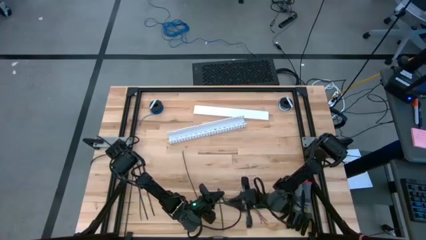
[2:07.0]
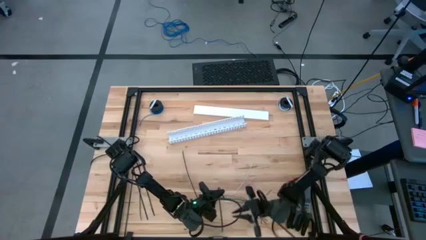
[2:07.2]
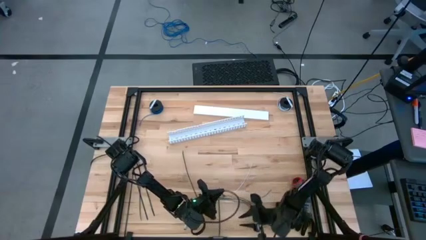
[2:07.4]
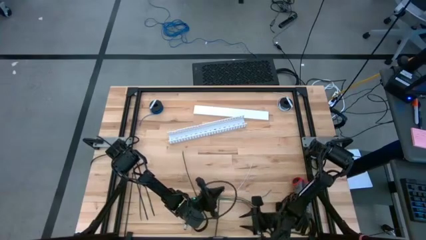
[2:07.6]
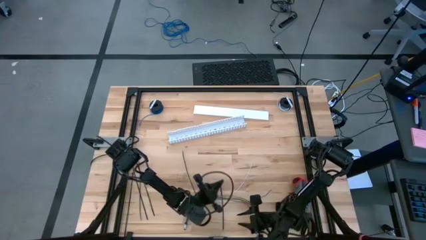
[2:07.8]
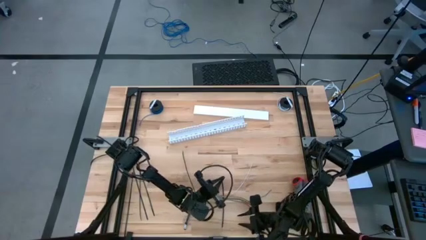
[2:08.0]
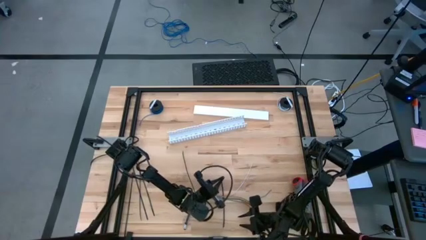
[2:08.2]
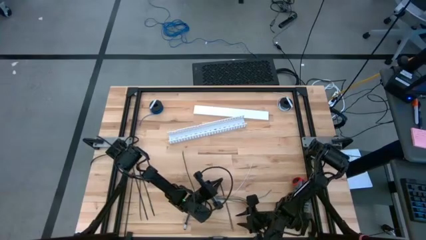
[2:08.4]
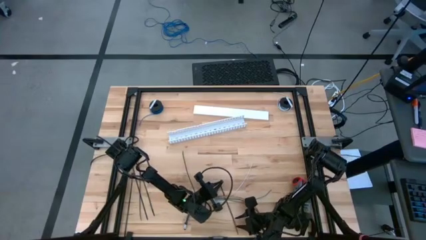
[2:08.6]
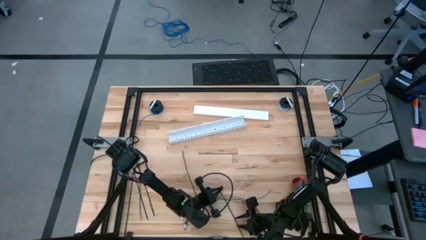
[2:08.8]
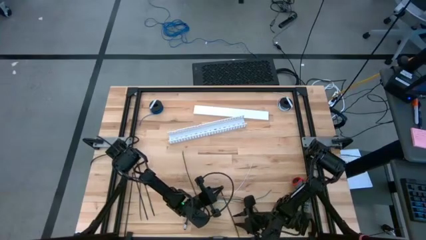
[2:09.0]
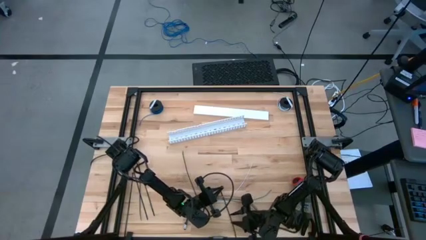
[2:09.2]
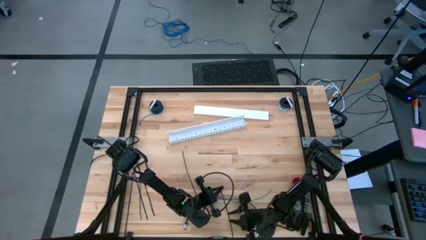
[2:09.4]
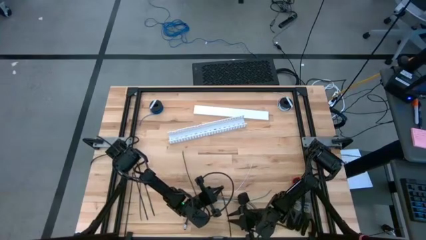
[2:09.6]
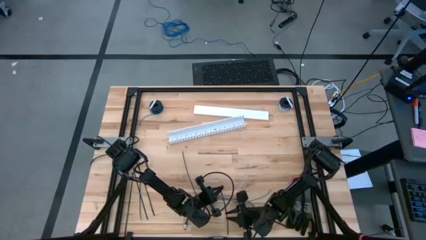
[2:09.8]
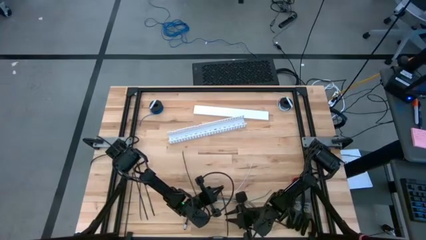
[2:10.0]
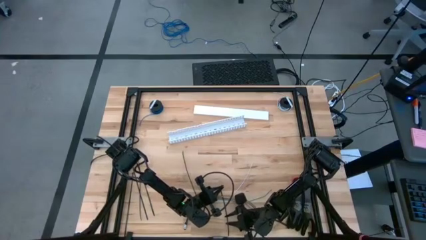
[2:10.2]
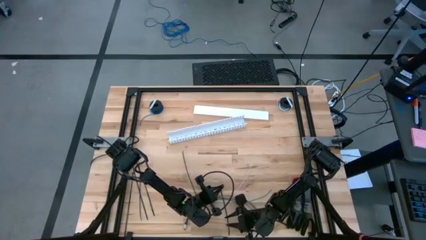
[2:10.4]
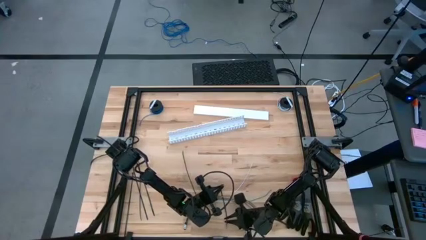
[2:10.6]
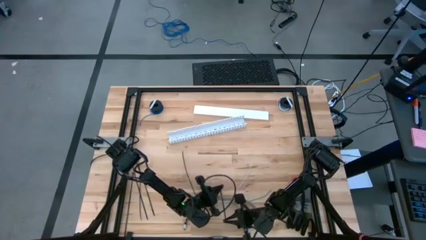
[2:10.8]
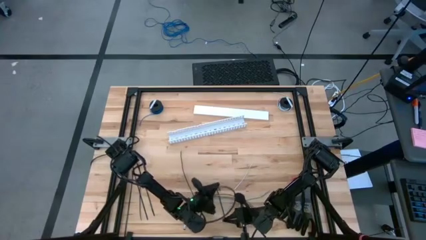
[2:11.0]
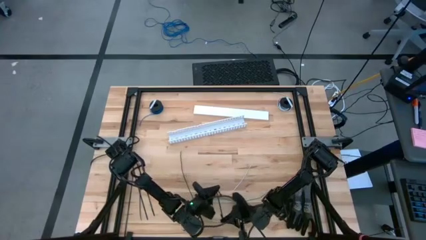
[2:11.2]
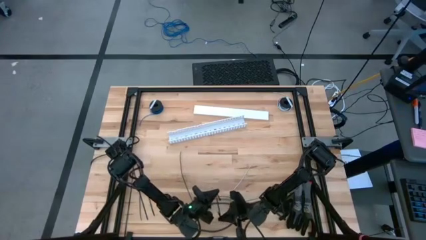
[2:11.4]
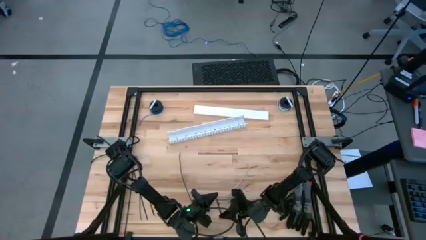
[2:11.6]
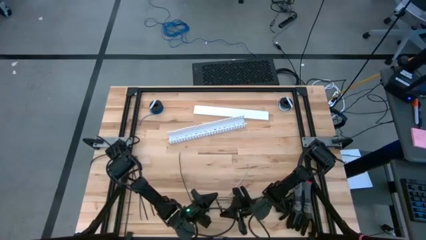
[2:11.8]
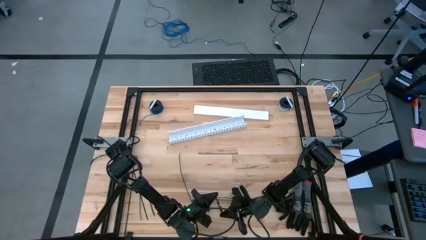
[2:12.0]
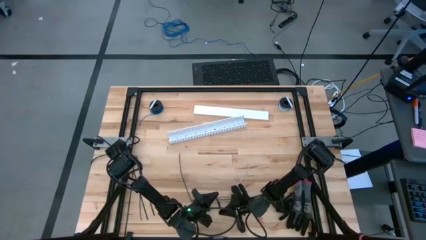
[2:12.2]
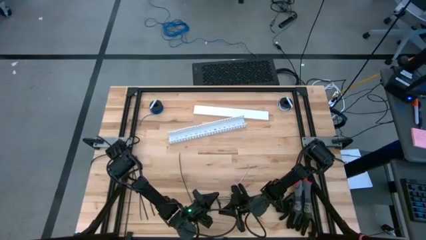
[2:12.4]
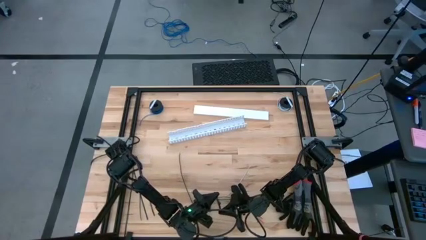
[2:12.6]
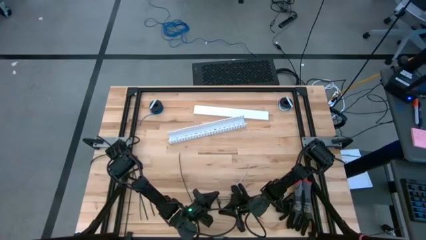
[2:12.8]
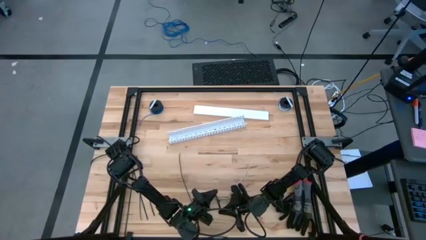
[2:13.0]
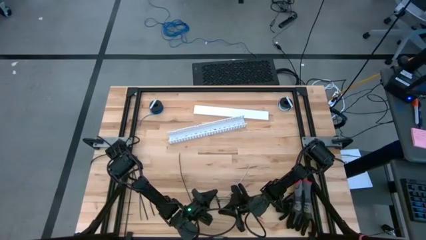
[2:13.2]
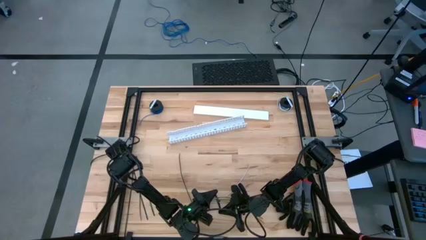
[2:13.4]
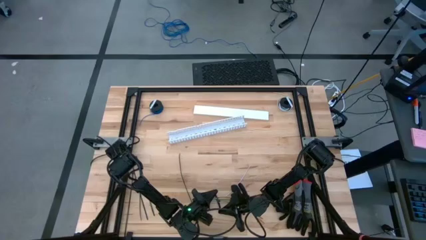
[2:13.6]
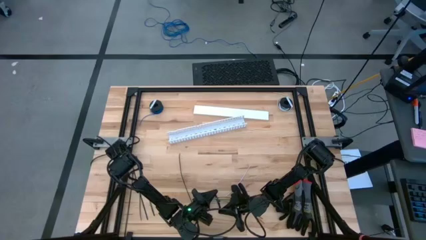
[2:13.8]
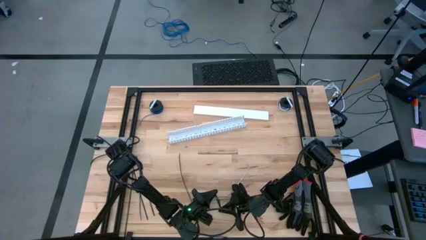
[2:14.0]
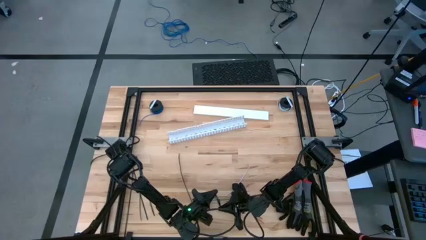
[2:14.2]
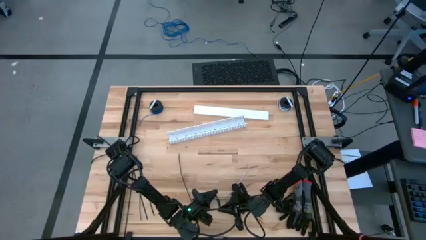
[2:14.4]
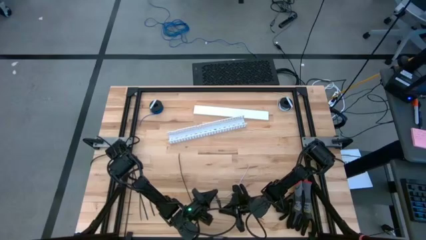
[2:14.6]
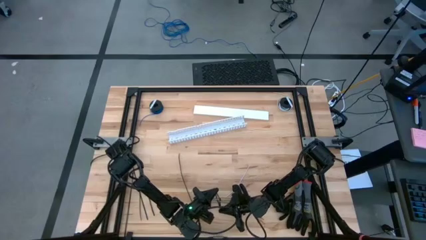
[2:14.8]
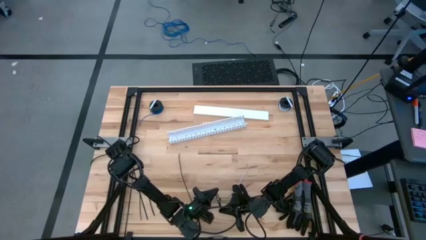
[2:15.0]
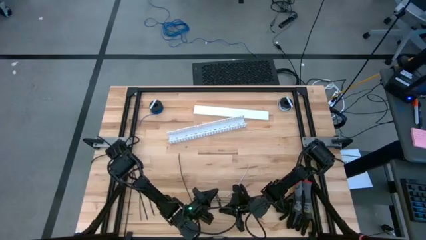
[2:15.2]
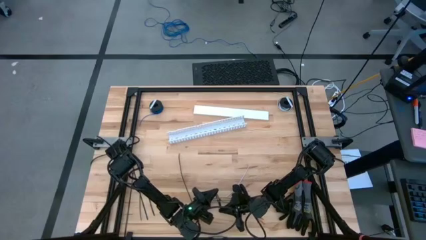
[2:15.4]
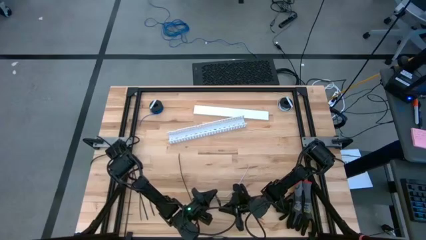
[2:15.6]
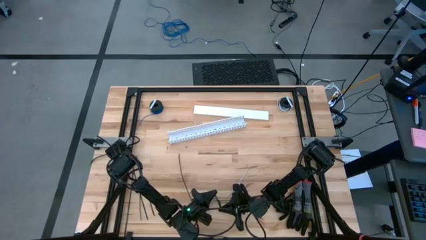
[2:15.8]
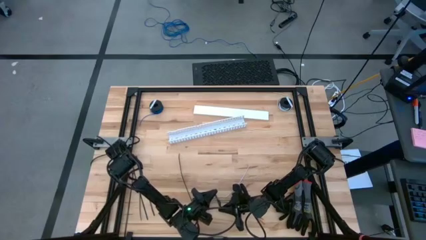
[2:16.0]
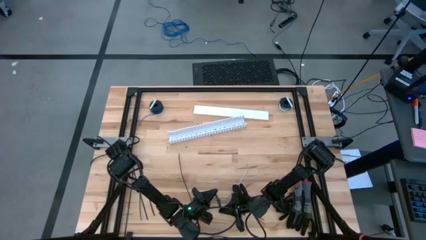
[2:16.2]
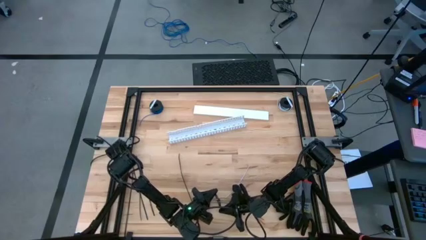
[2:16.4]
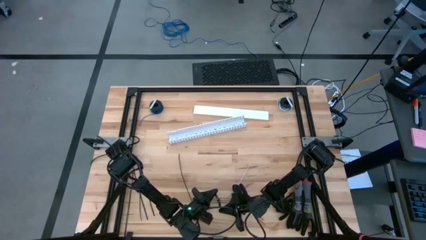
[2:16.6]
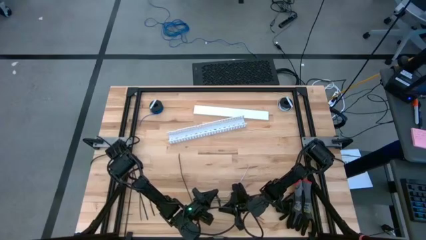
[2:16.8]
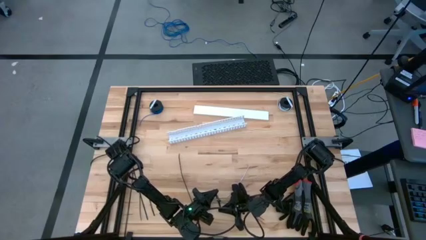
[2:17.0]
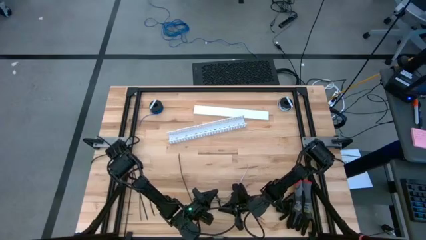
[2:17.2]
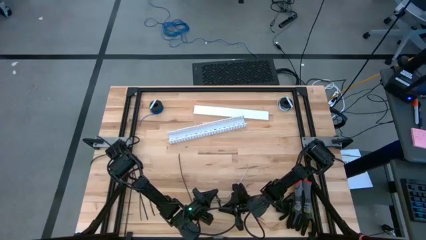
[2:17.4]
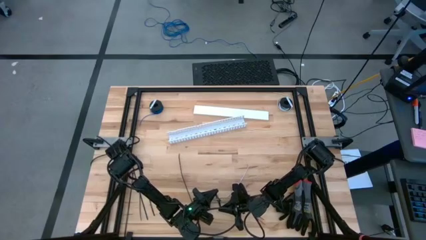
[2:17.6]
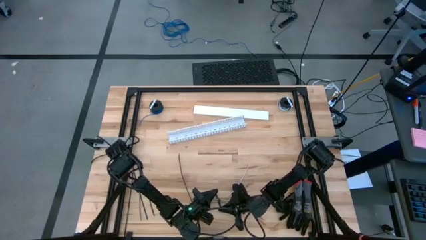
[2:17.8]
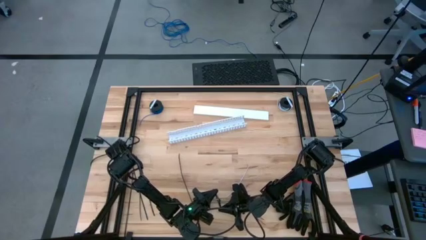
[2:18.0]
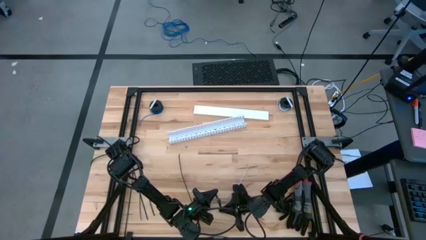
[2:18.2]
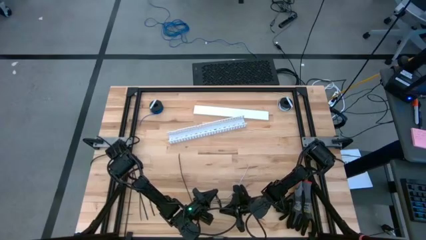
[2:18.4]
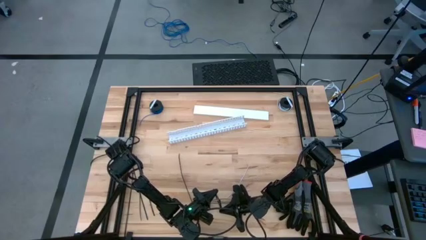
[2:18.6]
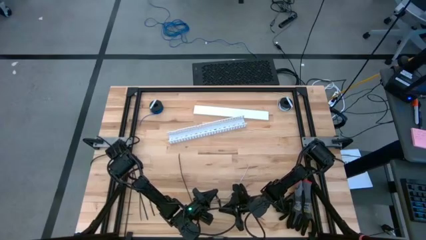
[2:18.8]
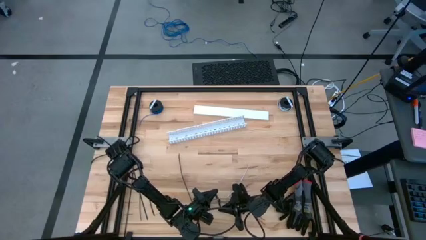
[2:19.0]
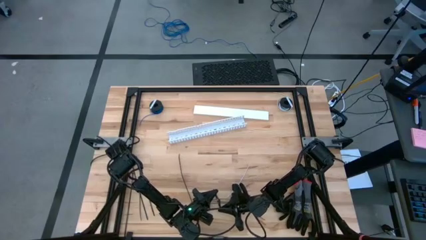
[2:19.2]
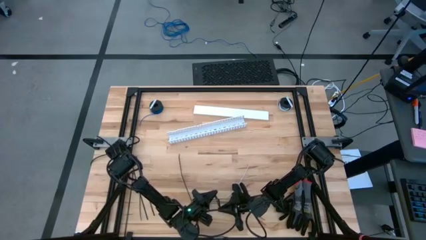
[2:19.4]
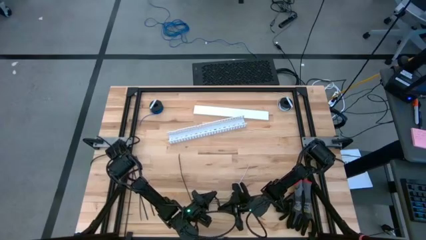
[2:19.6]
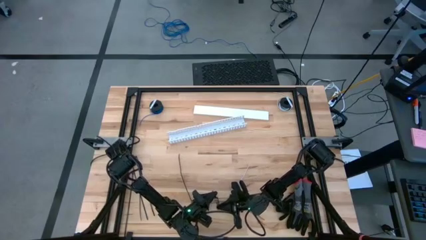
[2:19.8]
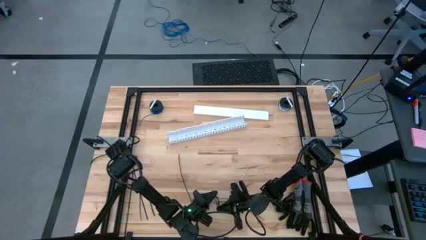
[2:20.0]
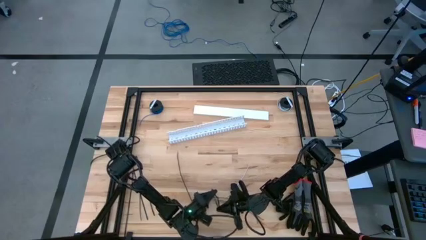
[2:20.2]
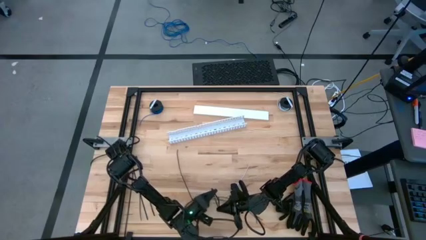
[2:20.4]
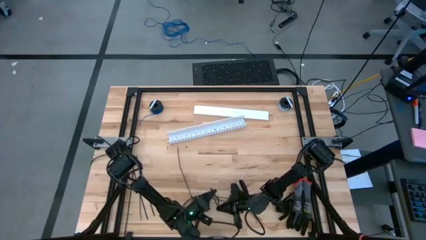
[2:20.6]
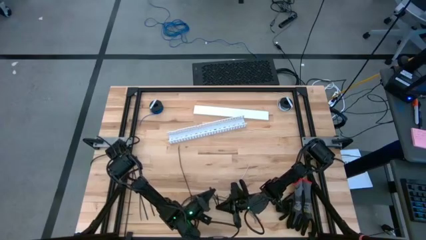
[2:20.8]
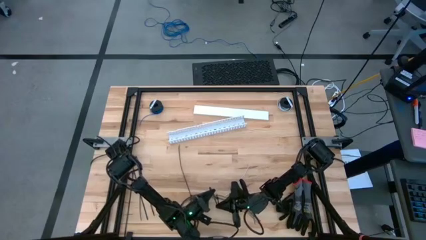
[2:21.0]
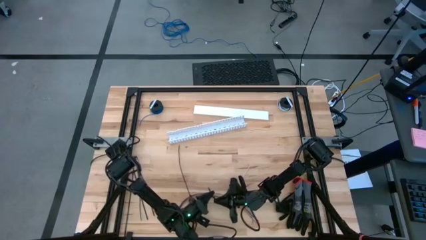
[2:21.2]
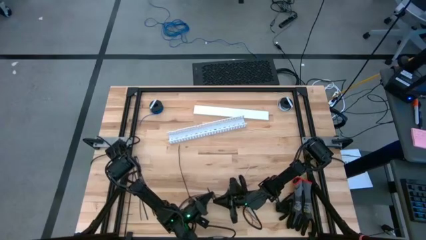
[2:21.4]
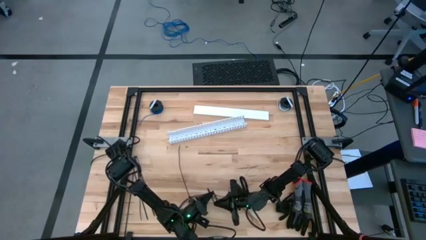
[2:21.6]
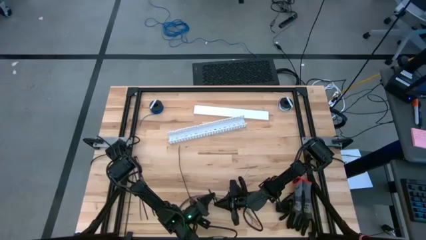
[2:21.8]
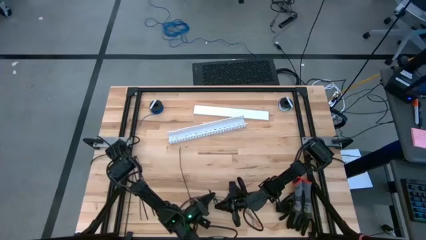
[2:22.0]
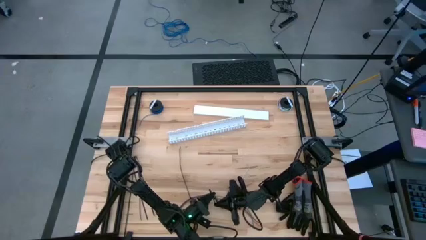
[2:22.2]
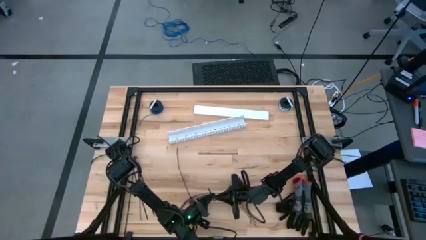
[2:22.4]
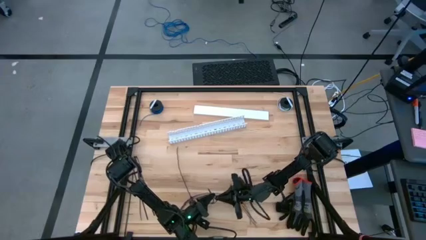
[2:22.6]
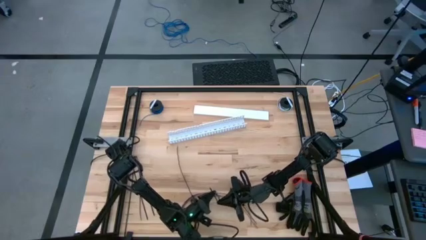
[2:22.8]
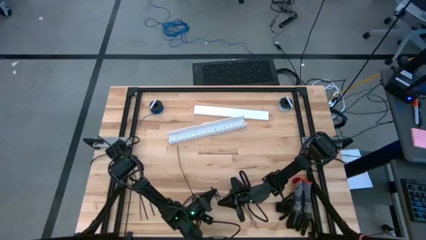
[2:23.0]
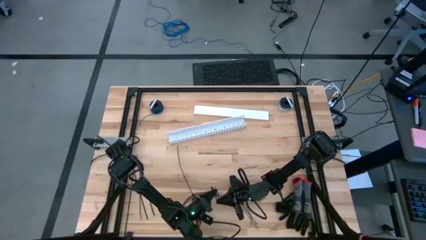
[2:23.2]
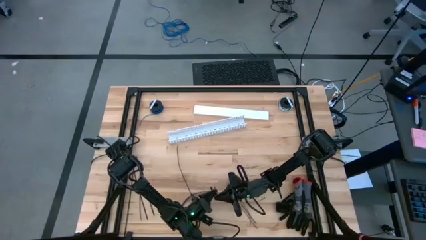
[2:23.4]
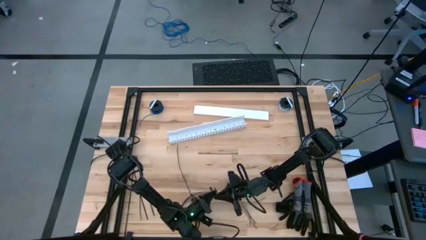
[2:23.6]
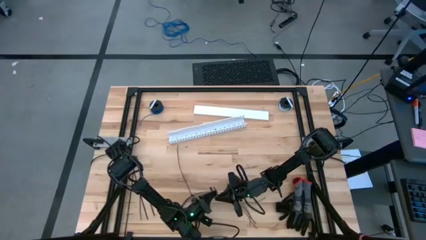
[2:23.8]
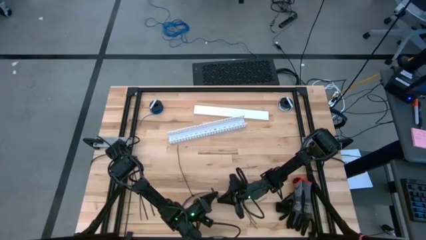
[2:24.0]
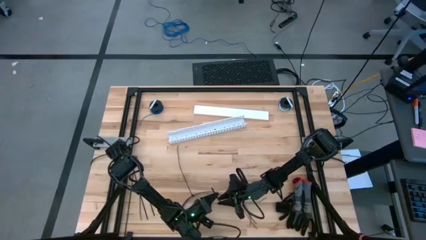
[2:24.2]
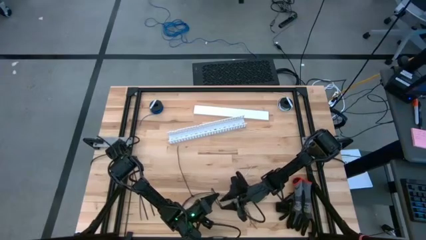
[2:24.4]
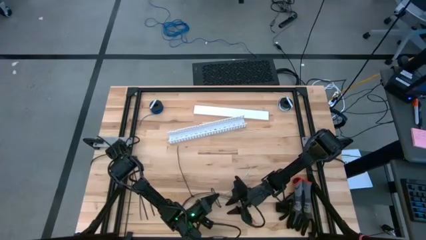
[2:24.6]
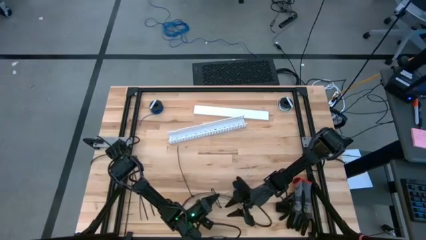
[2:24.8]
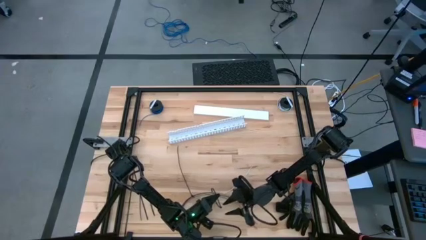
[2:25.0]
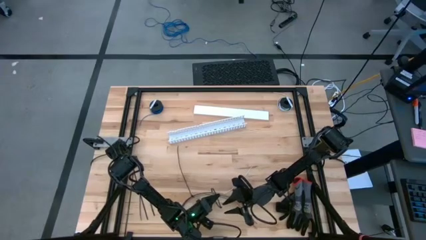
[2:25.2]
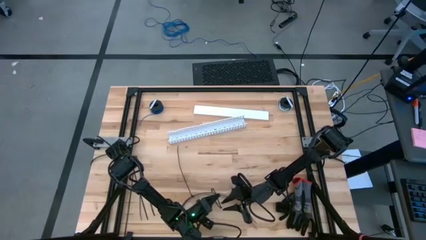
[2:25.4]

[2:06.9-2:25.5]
Task: Ziptie cables
Wrap the colored loose cables with the black zip tie
